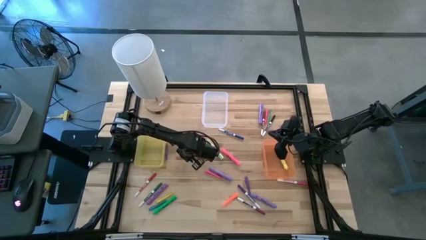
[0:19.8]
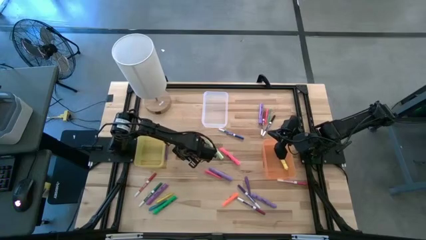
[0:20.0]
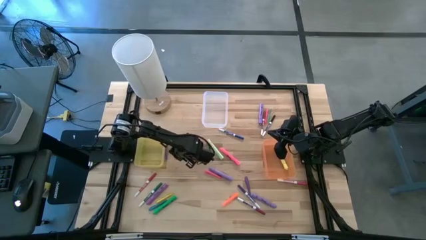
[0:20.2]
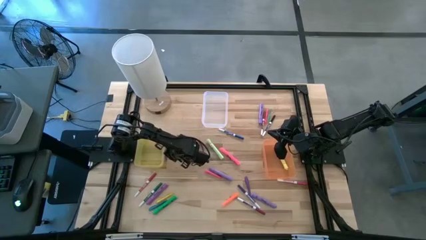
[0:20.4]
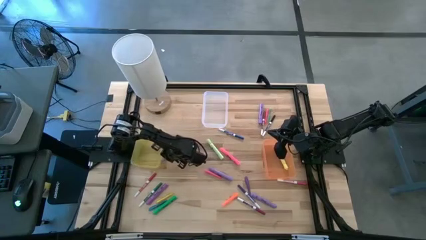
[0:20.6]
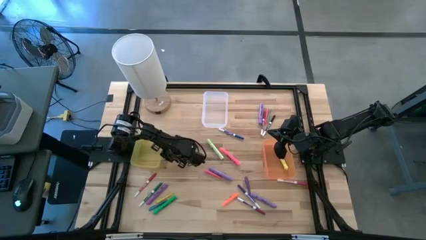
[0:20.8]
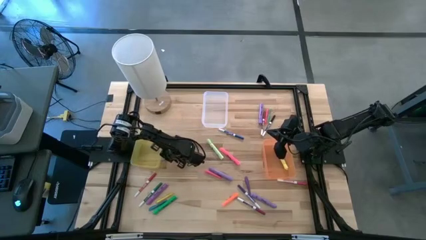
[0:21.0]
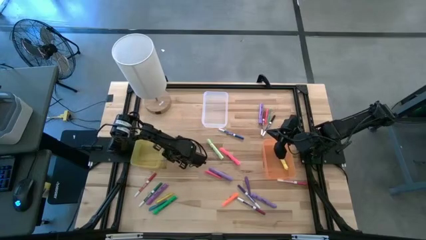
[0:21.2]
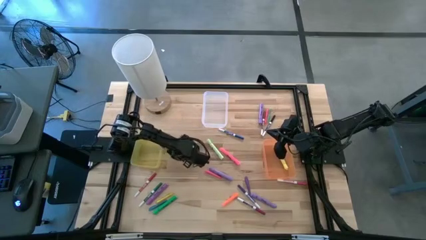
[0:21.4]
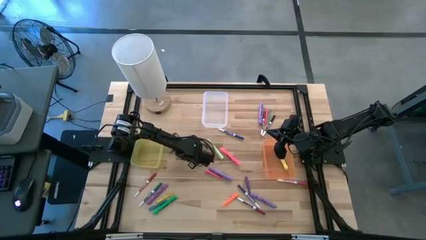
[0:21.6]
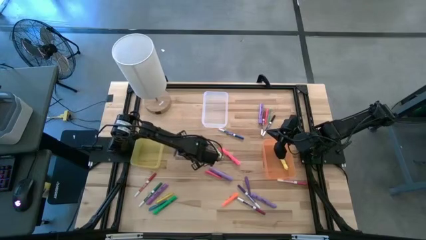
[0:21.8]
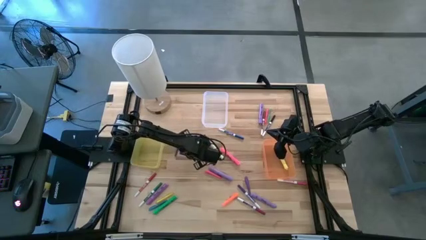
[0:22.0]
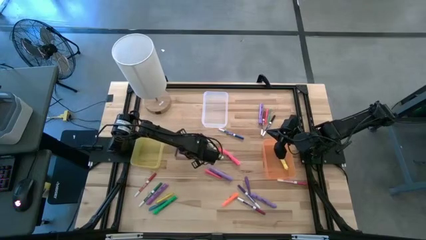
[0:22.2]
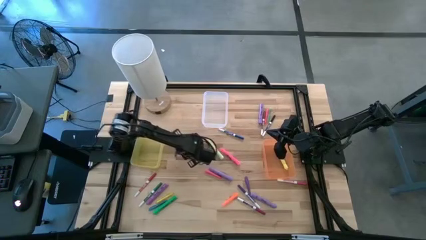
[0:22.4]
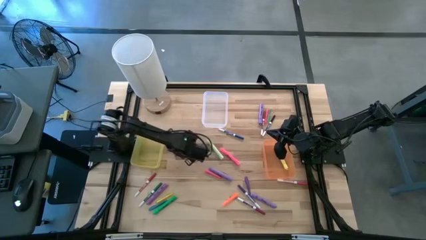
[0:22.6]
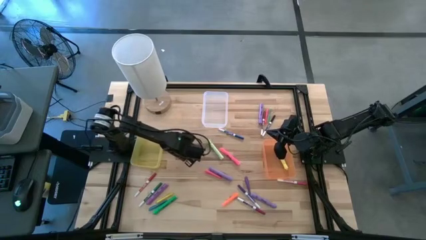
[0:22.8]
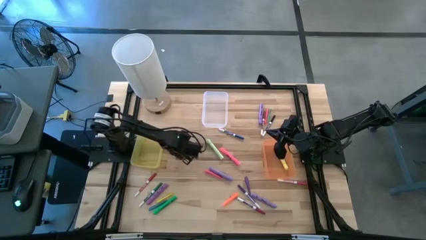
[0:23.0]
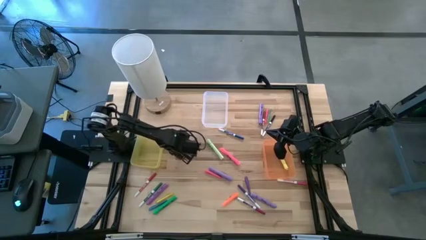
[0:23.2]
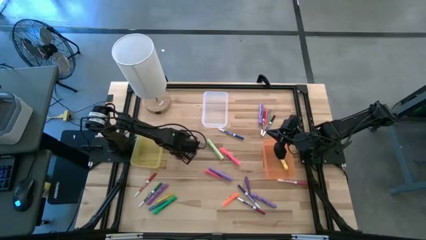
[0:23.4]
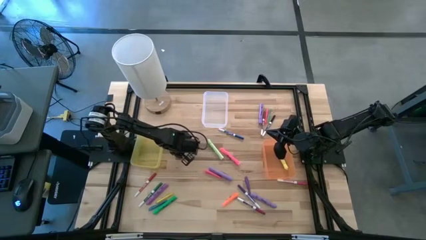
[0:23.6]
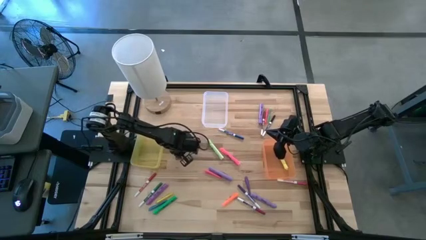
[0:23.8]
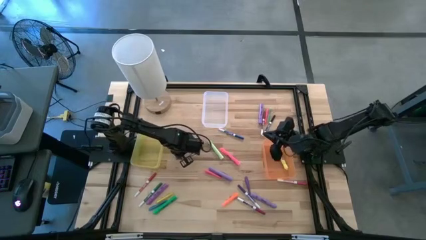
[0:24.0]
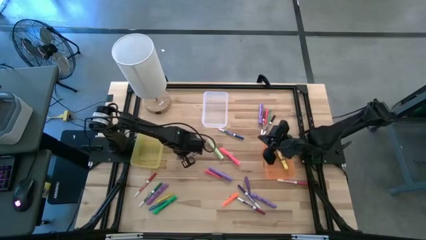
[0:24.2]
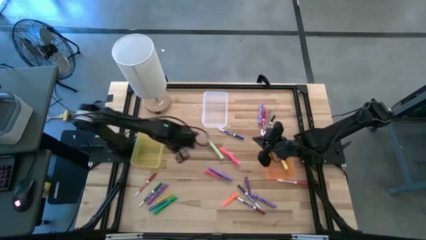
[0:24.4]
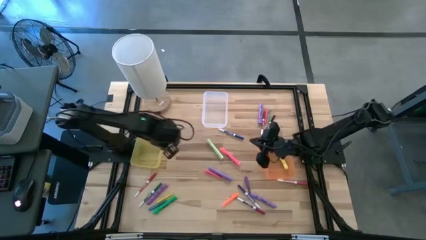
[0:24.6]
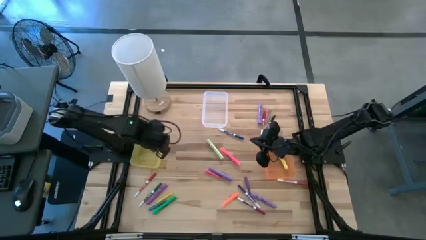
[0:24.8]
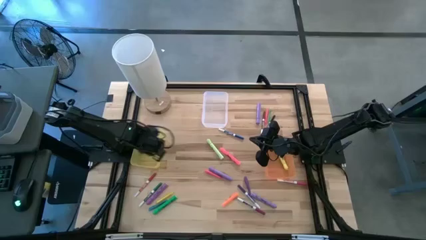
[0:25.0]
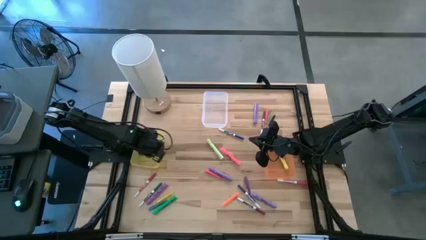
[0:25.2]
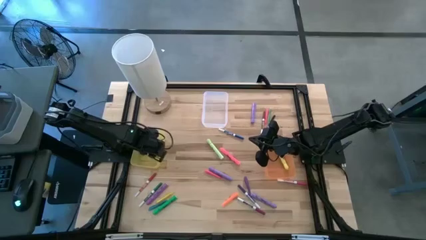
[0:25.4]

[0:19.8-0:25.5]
Task: Pick & Place Markers
Put the purple pen into the yellow bin

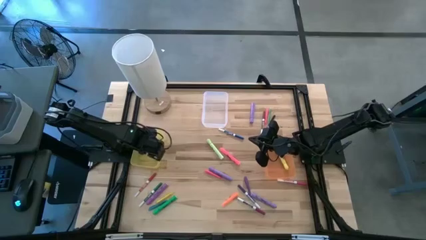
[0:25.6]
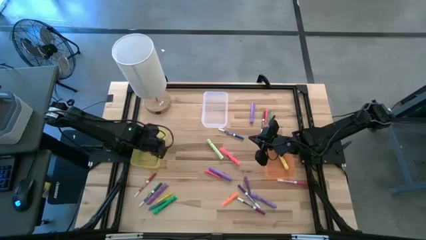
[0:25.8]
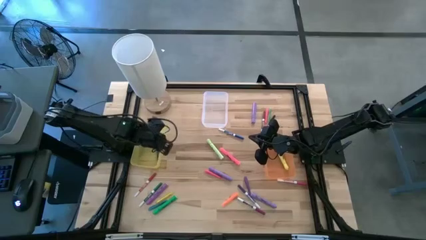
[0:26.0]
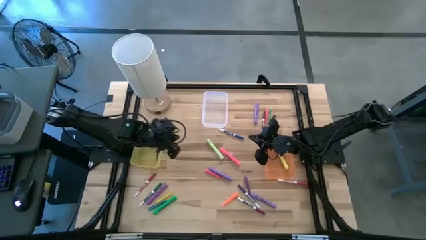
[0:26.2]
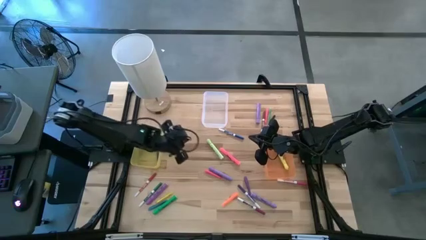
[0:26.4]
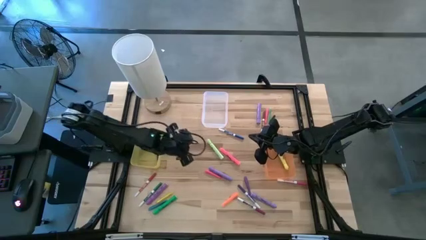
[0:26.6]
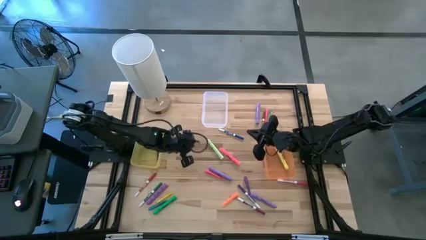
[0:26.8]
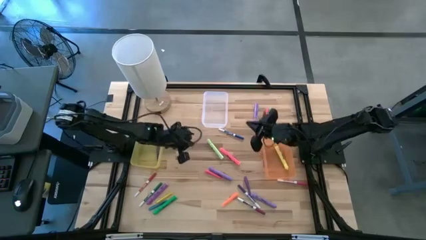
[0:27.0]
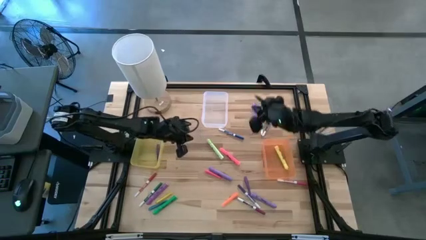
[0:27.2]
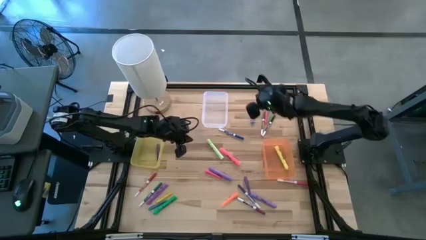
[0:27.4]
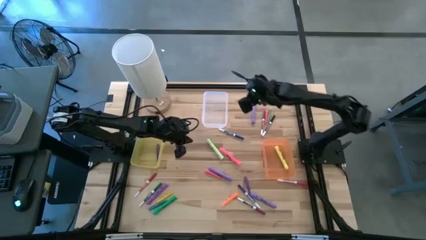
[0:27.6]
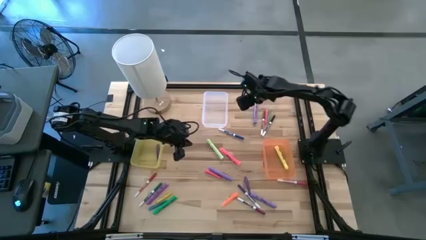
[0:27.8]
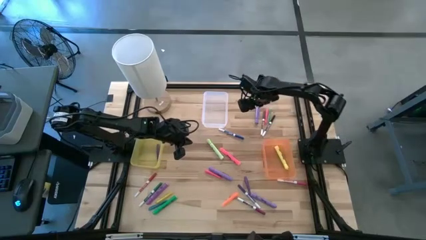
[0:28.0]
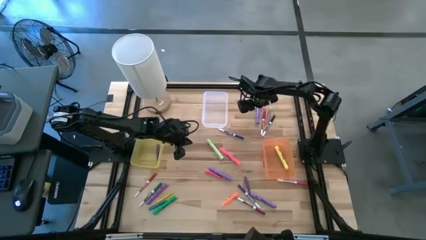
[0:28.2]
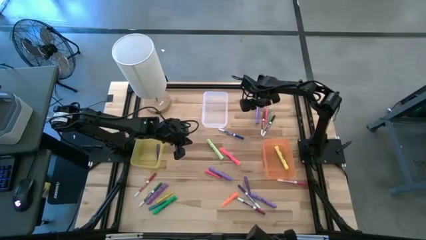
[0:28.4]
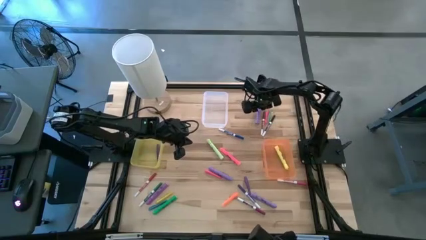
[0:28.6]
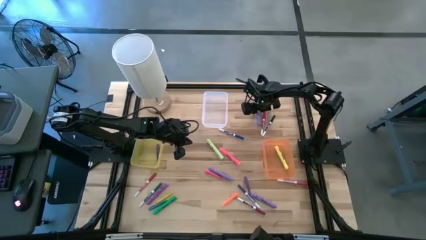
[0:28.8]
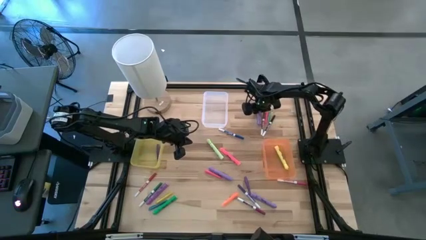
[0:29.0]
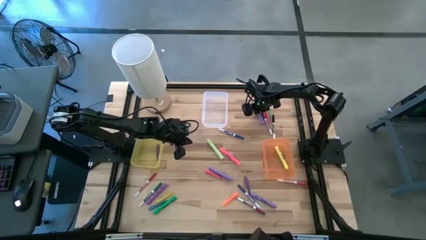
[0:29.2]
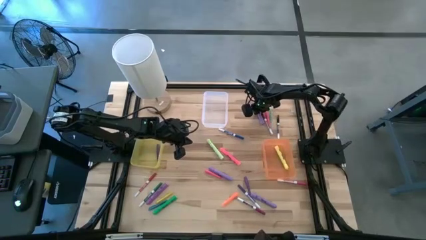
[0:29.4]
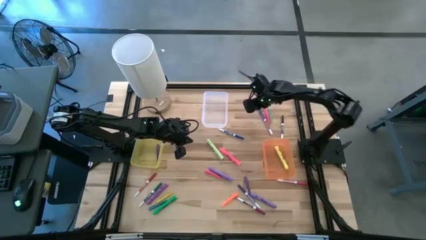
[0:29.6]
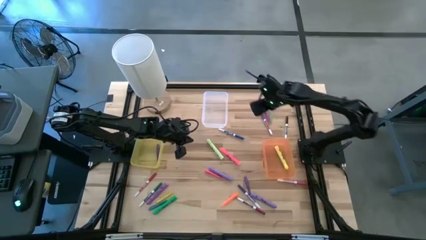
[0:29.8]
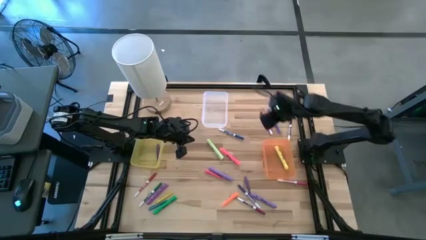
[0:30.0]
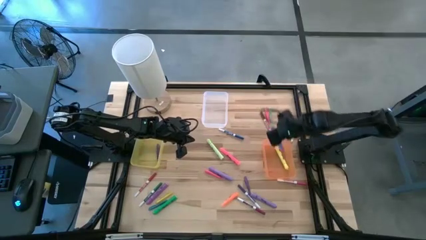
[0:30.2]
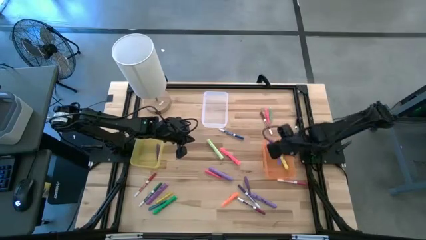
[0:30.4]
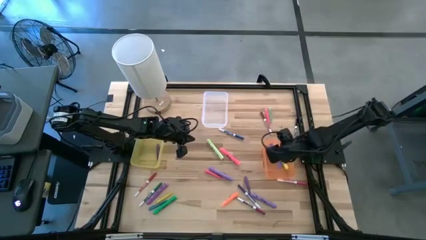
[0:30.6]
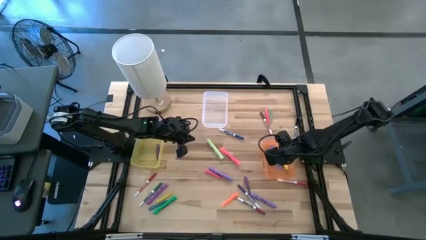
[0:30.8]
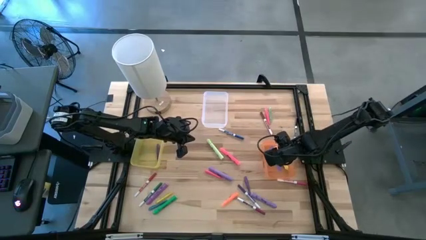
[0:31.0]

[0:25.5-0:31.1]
Put the purple highlighter pen into the orange bin

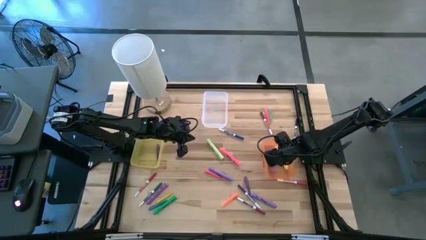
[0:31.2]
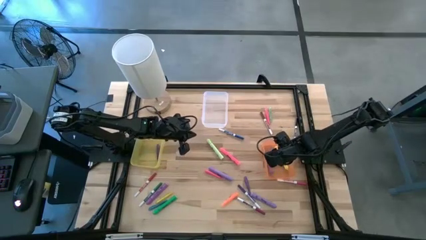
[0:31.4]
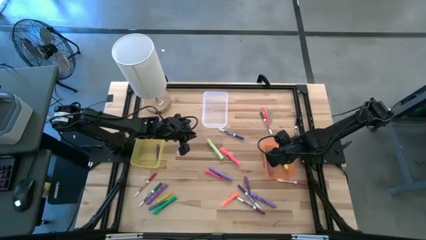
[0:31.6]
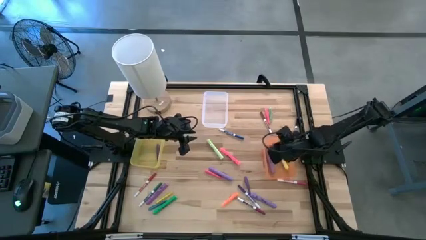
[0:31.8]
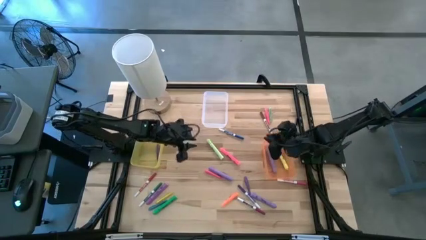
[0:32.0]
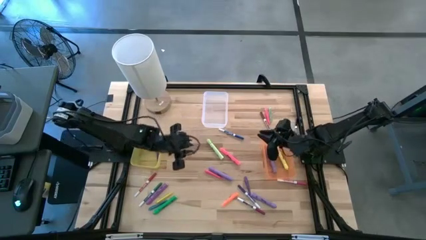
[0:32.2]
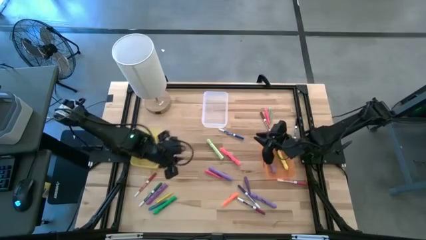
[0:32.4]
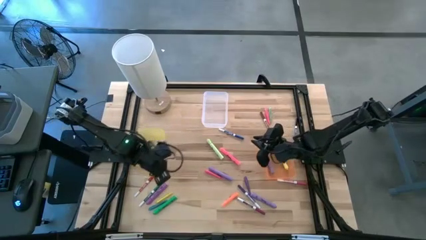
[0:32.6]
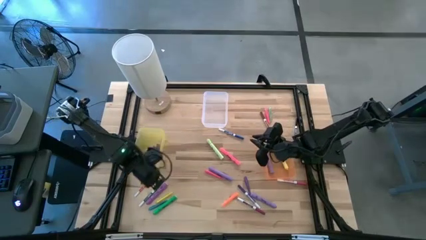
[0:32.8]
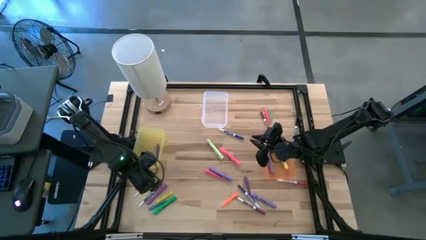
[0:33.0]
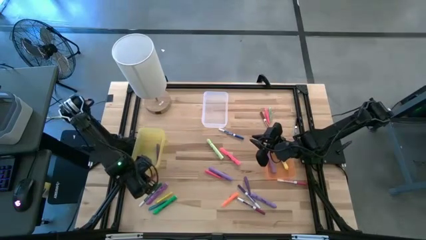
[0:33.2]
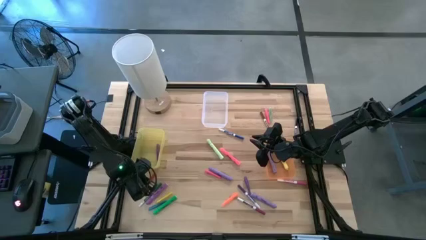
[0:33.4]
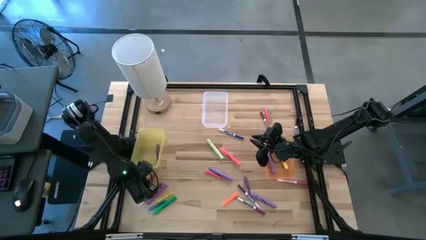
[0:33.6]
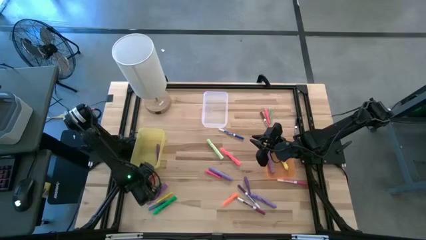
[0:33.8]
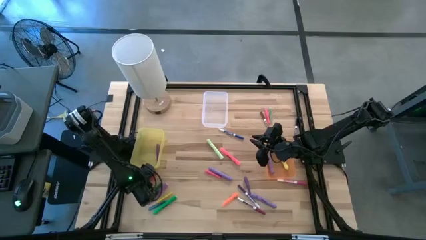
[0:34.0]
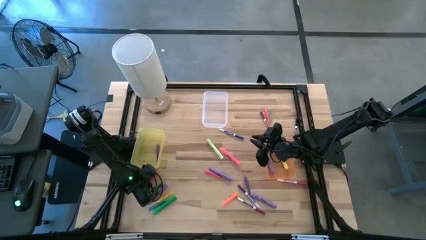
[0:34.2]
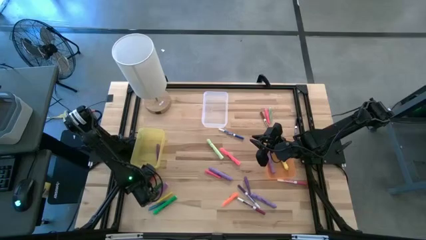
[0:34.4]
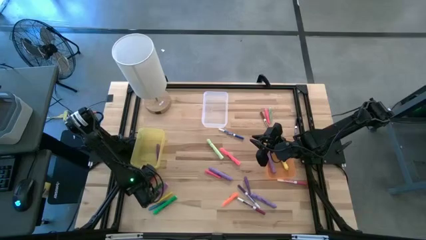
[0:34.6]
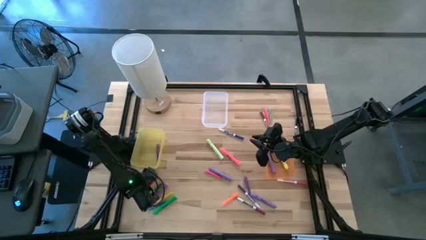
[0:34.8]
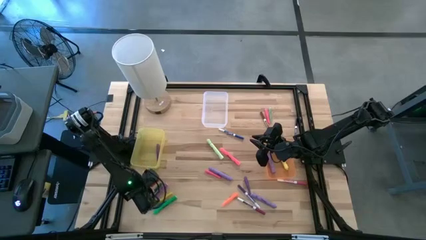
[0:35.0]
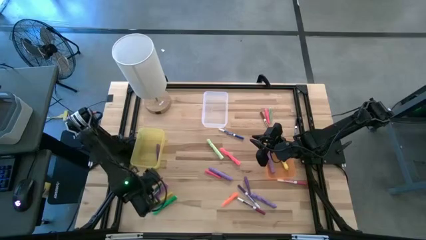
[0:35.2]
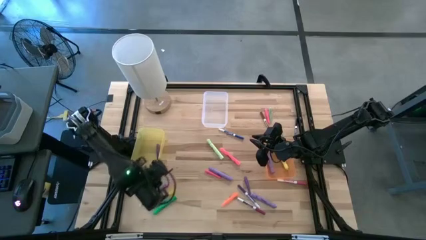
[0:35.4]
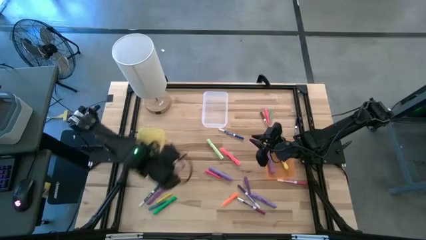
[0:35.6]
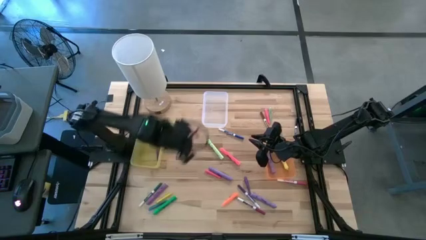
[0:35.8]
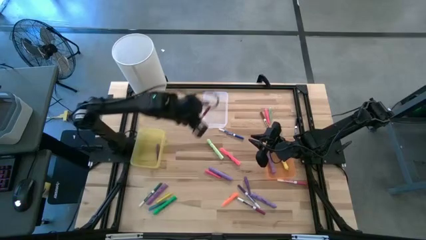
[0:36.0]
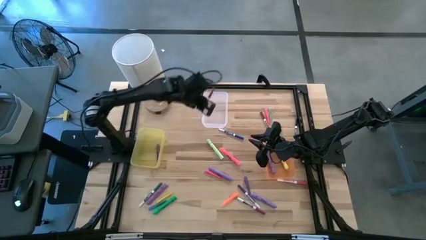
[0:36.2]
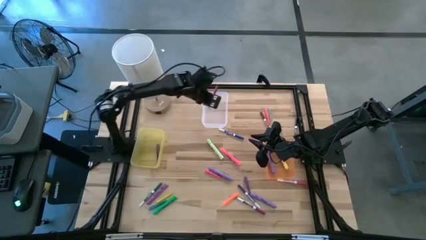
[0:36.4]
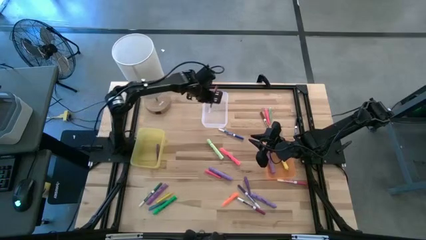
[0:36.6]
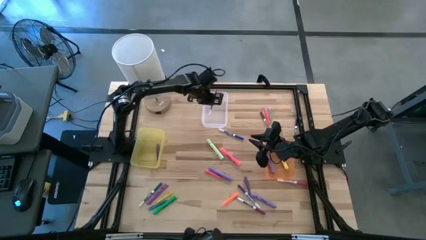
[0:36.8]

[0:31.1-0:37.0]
Put the red marker pen into the transparent bin
